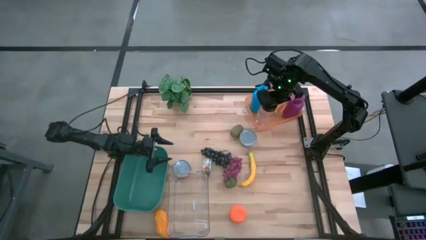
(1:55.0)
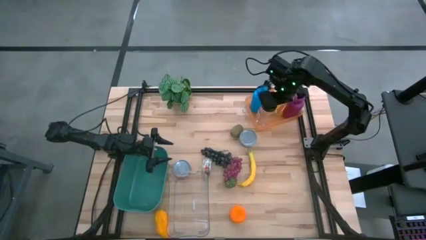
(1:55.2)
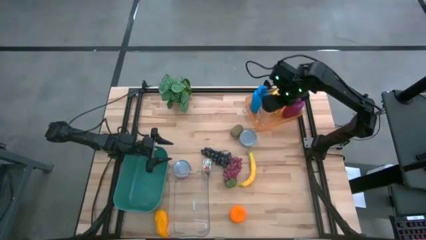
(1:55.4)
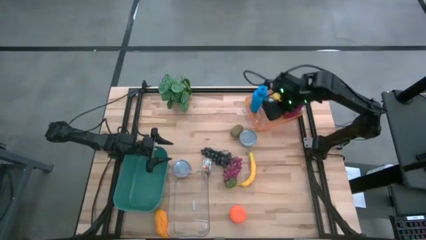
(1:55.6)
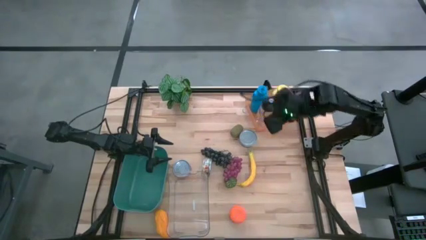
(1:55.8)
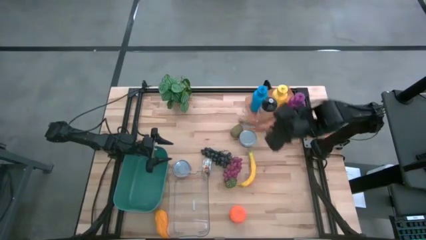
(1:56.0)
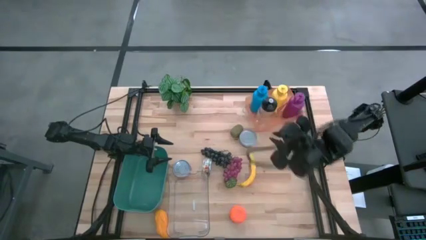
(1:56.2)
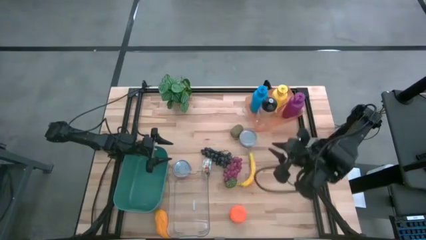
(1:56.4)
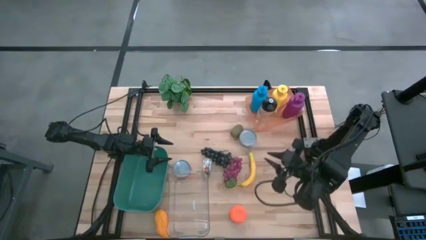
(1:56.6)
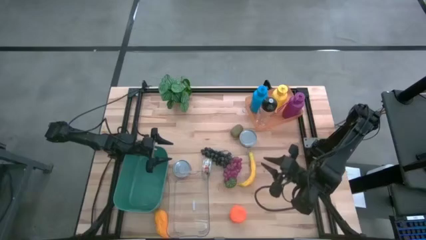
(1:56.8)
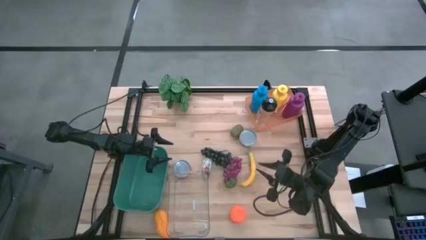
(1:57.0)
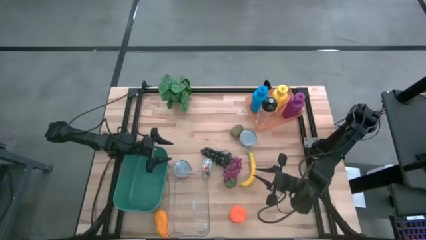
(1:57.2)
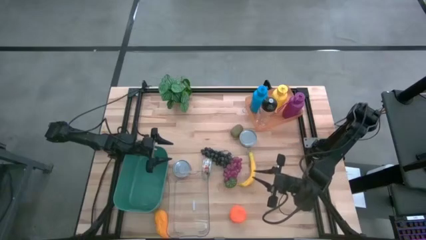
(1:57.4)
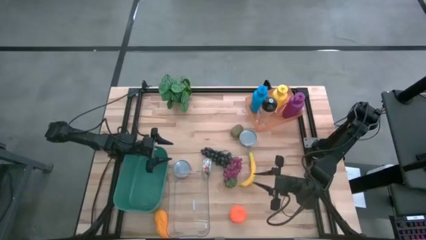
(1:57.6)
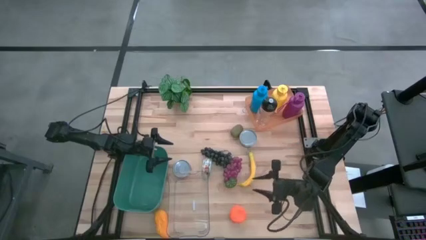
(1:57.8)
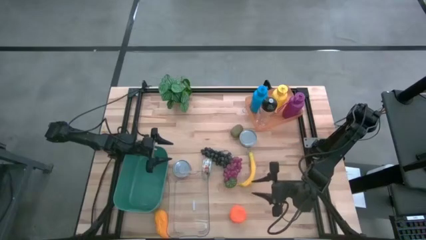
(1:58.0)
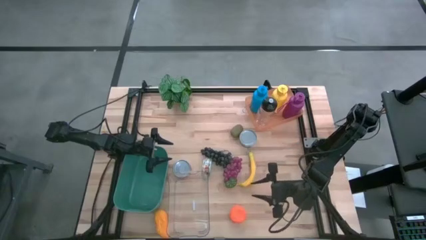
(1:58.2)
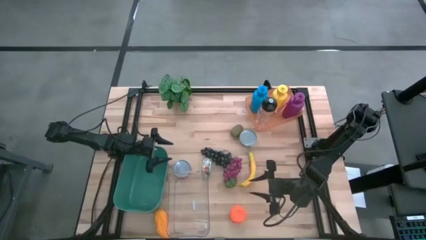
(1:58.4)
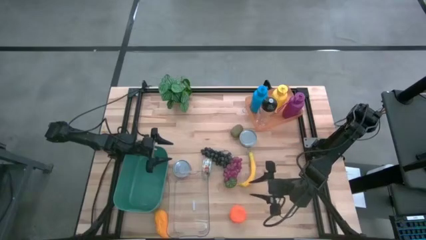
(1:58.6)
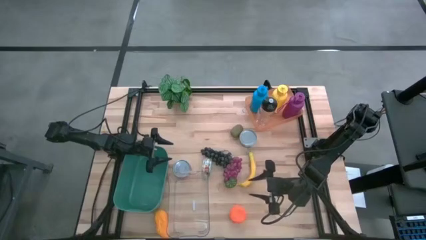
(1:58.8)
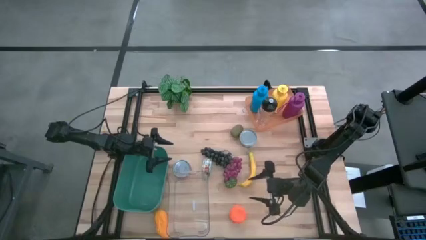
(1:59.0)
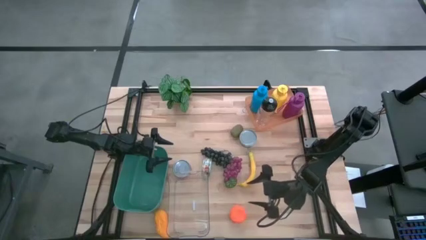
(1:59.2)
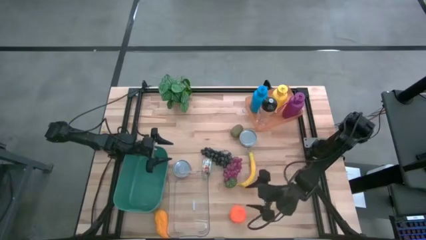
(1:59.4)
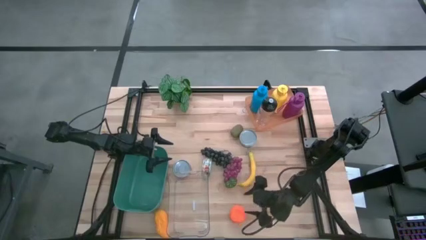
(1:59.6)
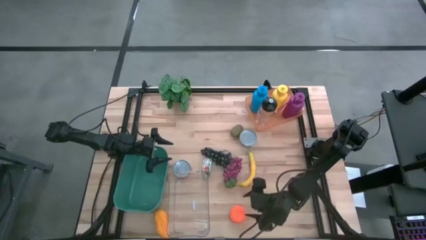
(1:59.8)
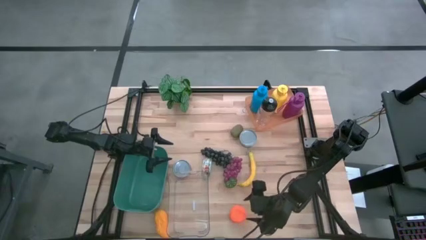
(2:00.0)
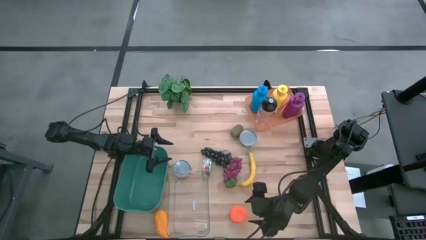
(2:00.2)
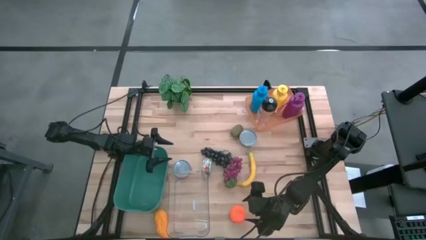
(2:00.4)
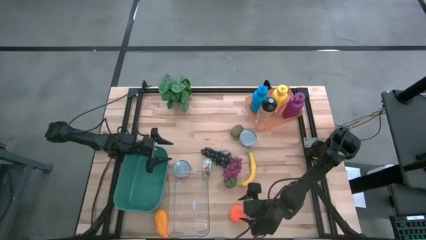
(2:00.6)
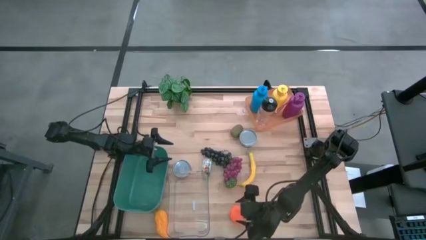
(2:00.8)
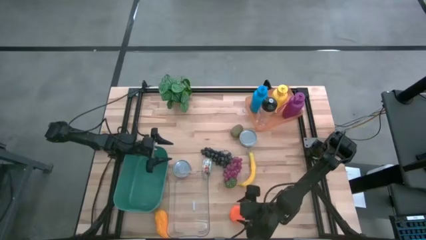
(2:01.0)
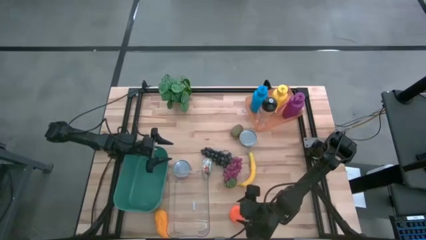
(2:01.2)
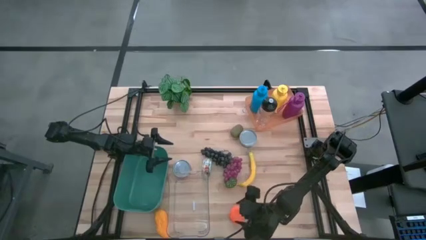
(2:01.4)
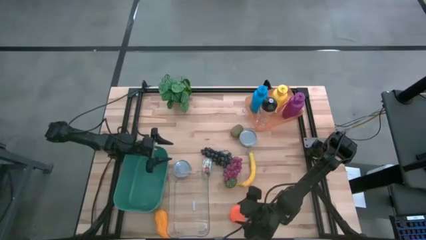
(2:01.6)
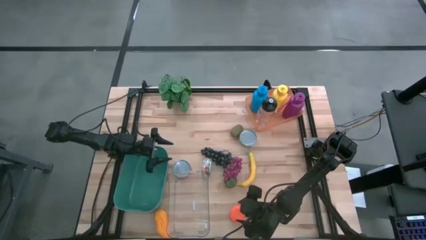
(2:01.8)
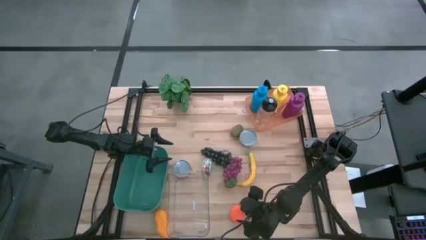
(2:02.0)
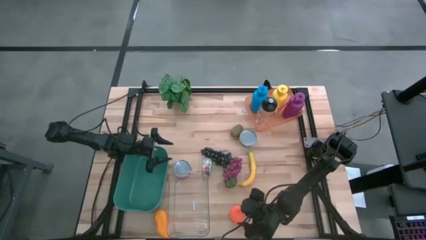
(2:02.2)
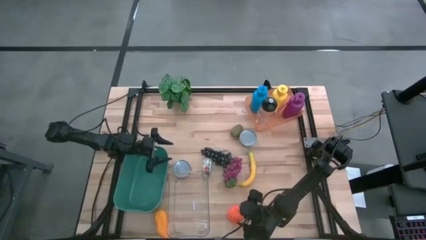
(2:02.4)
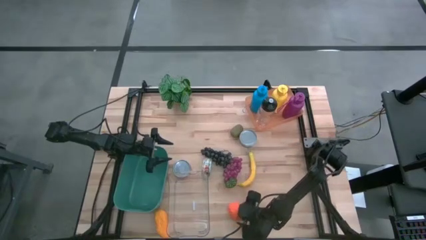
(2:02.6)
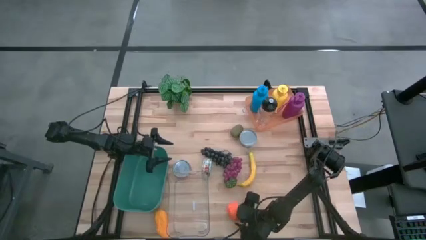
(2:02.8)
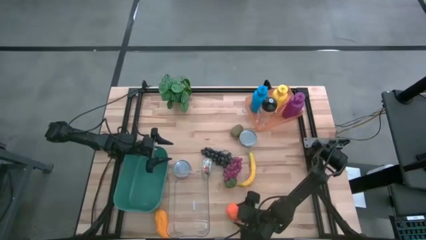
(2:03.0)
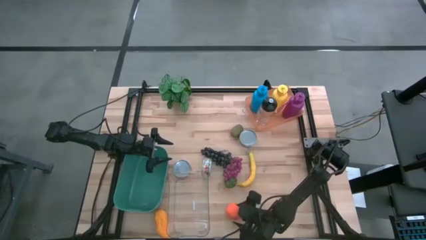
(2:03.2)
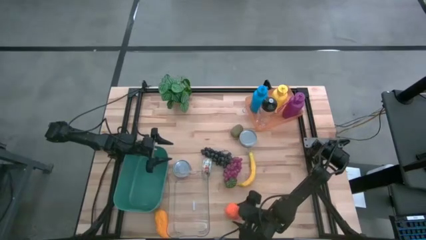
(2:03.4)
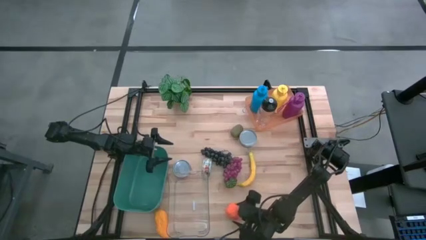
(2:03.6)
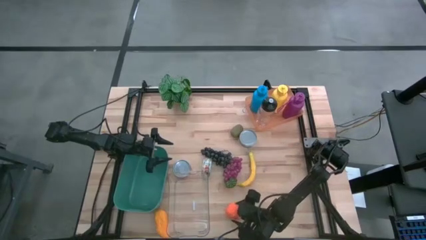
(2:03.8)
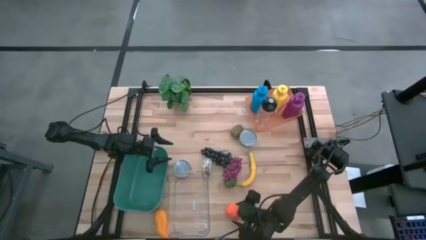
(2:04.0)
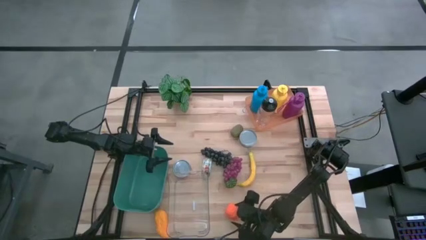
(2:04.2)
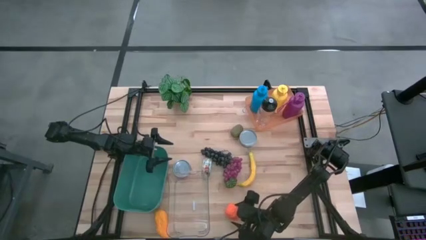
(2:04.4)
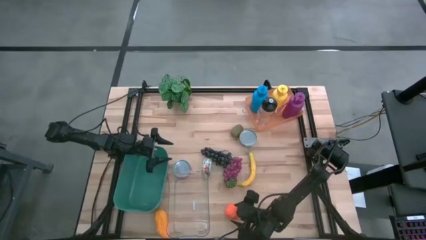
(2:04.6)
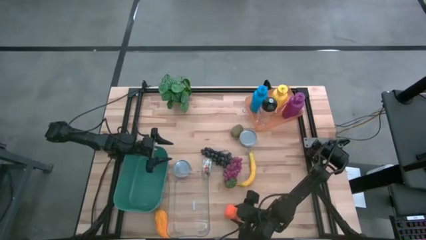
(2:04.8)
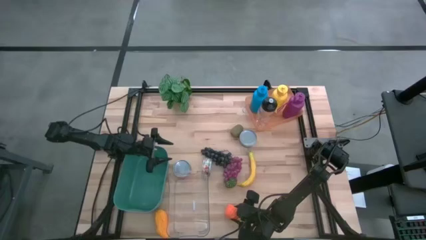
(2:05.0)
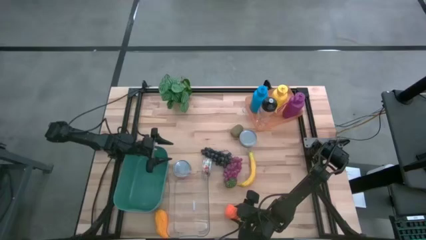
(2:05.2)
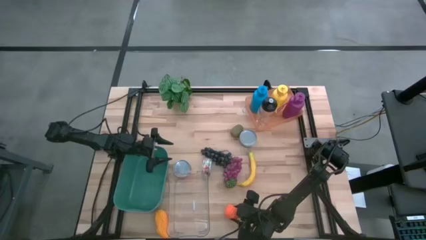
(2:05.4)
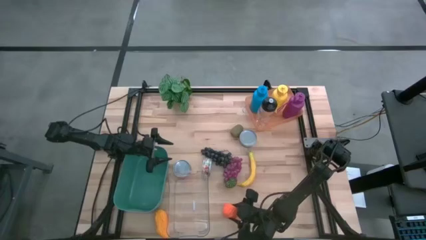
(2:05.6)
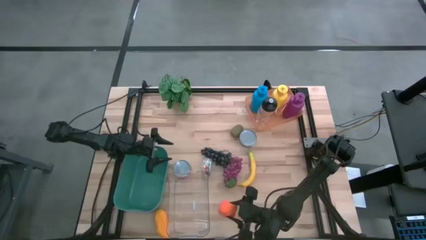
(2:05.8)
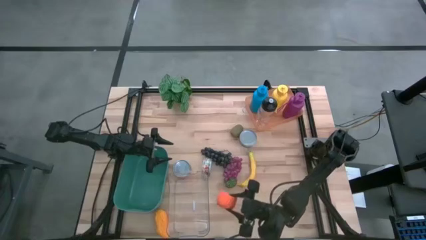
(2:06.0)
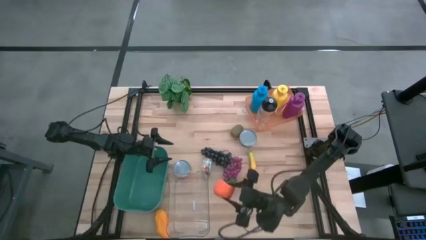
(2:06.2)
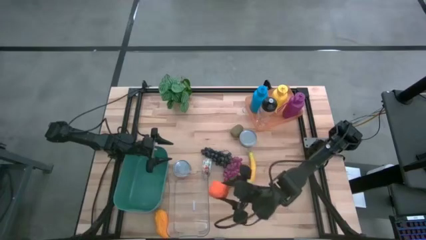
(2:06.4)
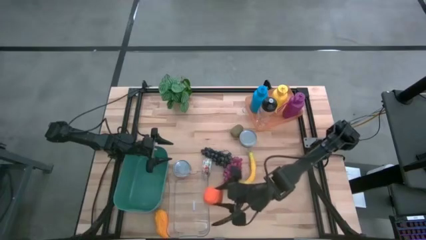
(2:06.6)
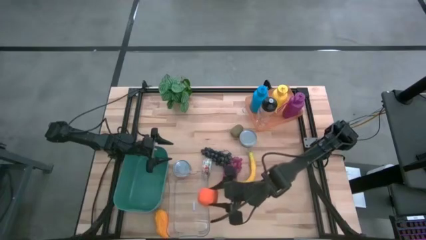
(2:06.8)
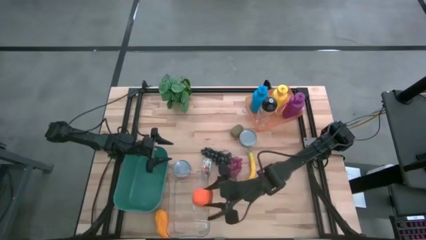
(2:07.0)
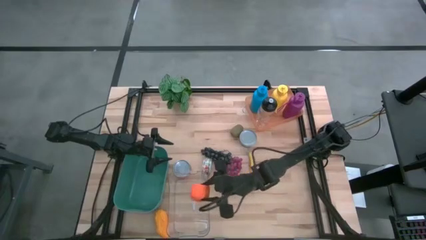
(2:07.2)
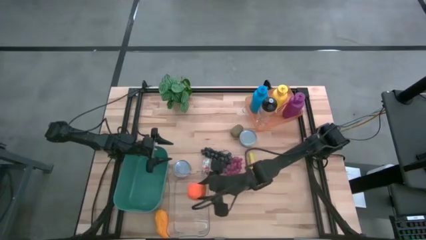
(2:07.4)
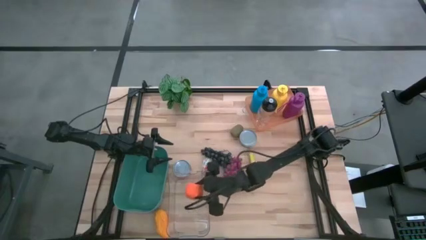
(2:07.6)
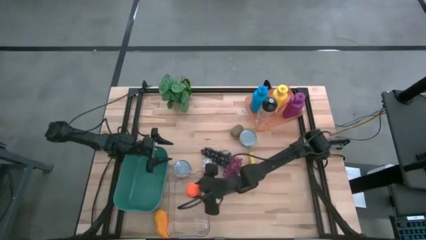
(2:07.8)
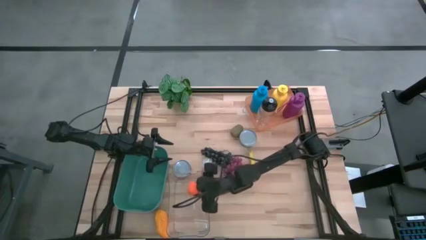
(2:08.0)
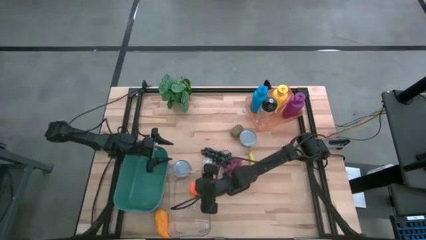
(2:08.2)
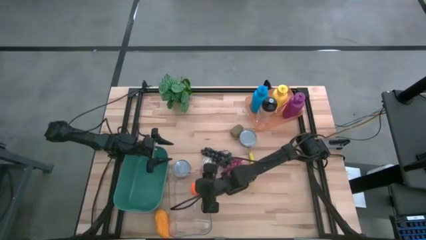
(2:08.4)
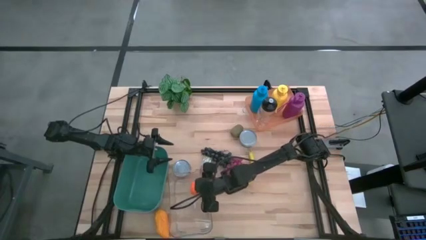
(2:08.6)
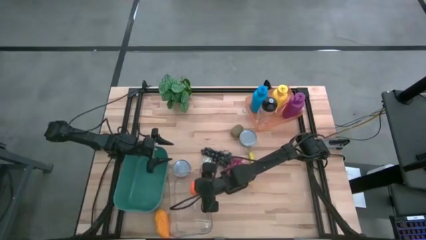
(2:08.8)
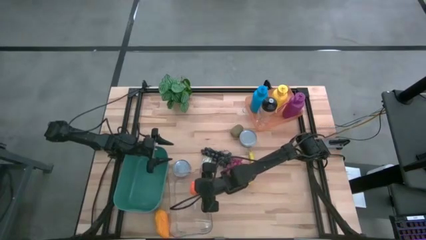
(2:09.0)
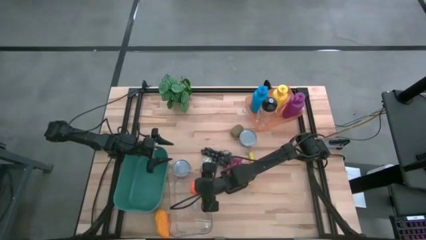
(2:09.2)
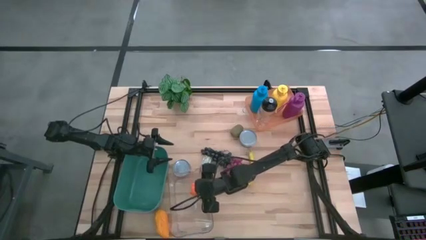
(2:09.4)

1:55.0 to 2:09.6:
Task: Pick & Place Food Item
Put the orange fruit into the transparent bin

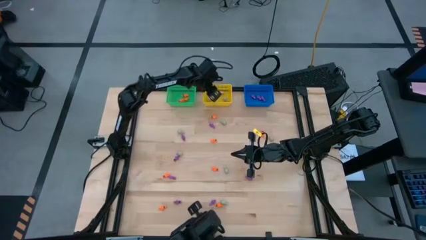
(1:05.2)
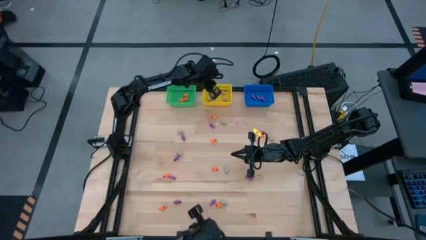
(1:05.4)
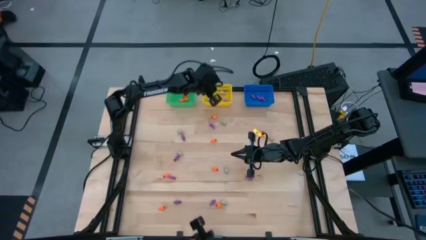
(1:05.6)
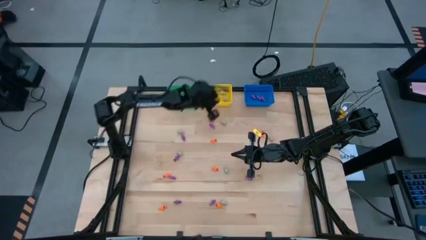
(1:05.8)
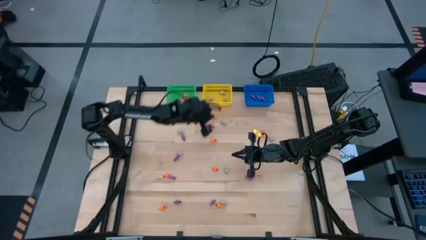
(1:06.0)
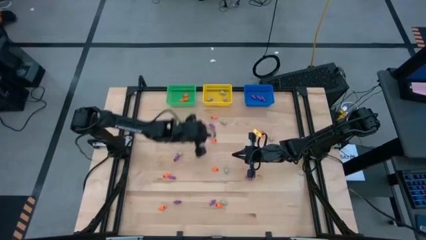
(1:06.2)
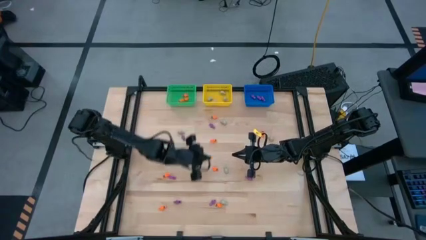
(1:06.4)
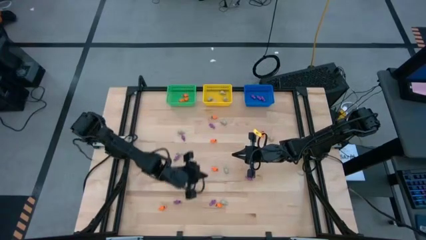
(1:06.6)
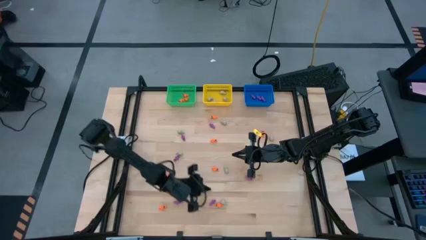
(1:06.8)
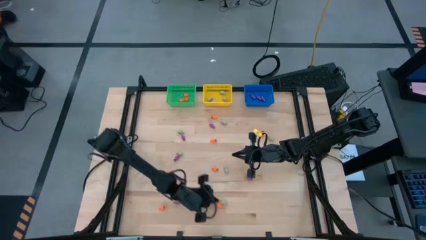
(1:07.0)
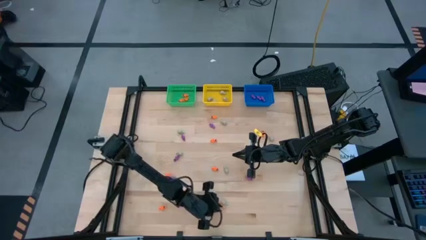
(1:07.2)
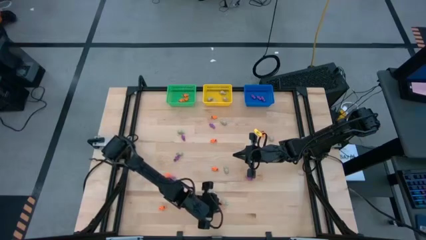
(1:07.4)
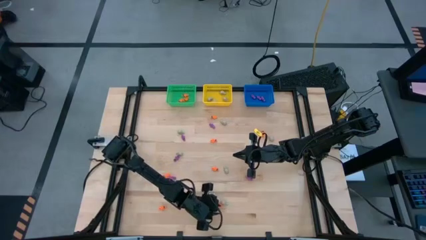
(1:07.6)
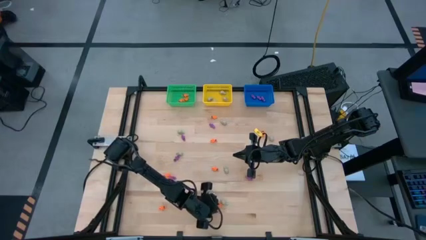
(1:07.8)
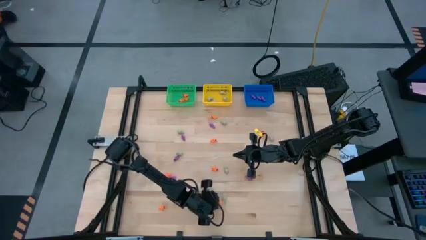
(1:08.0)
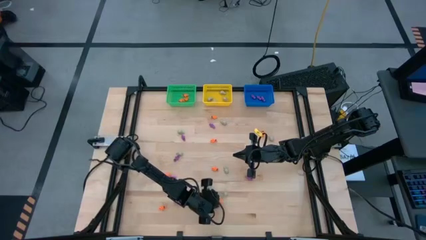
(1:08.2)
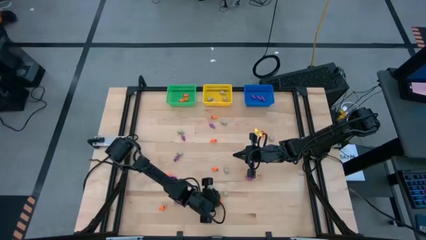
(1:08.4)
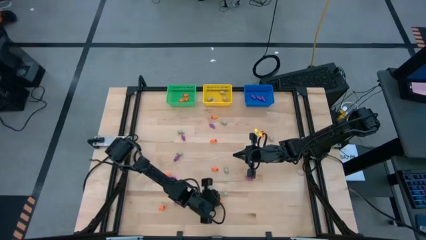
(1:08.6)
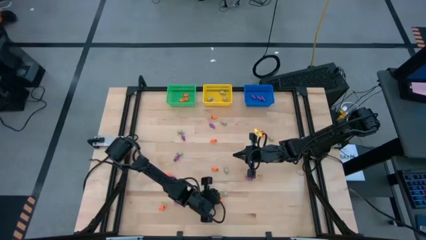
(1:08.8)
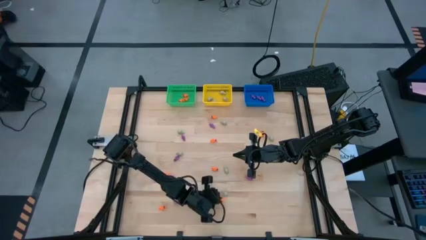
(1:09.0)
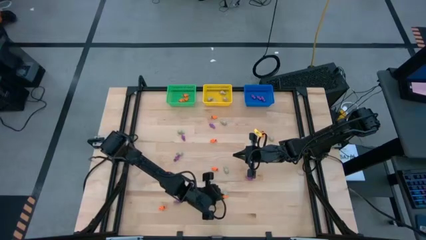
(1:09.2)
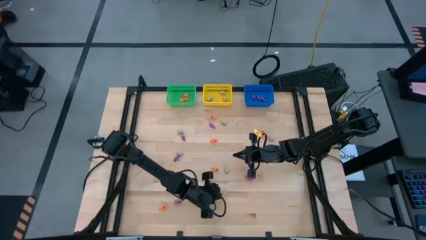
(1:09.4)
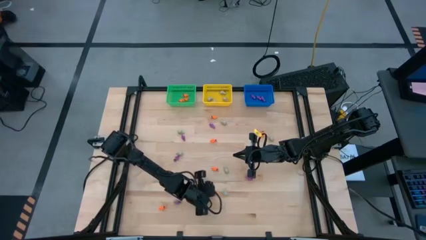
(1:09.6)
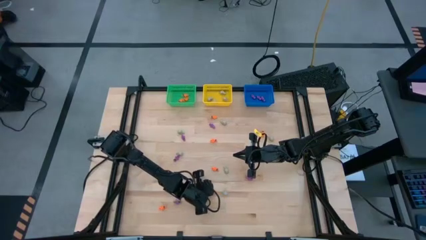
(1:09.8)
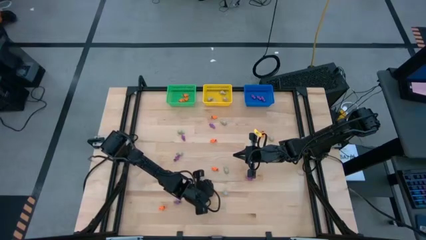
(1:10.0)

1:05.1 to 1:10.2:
Task: Sort Halloween decoration
Put the orange skeleton toy into the green bin
